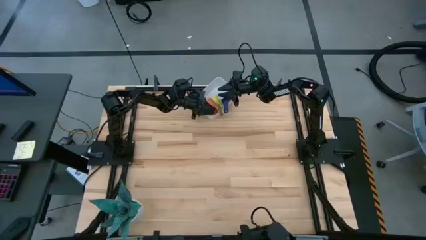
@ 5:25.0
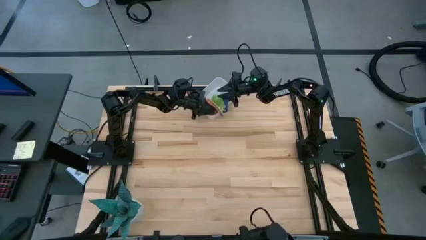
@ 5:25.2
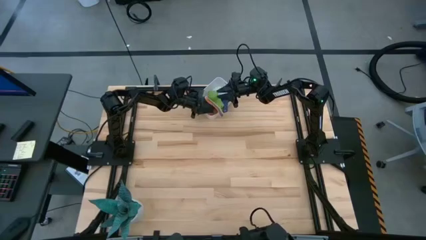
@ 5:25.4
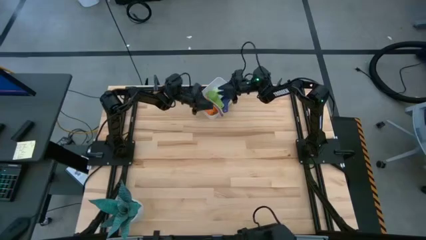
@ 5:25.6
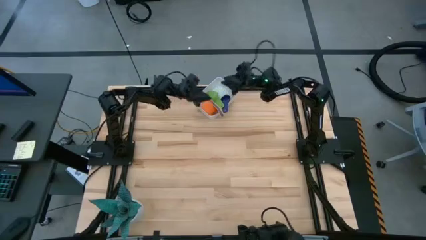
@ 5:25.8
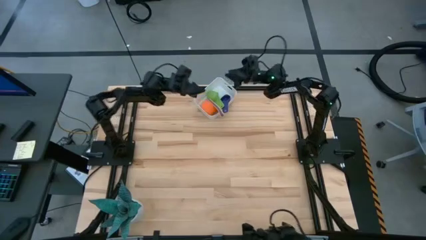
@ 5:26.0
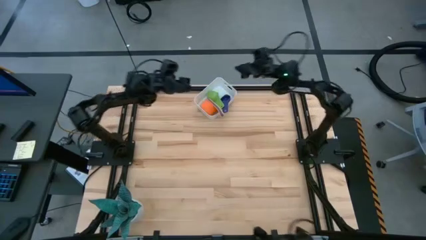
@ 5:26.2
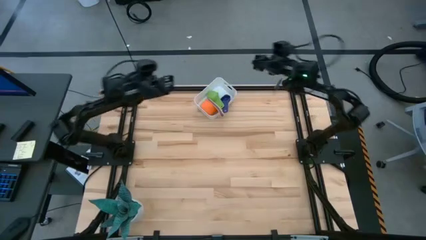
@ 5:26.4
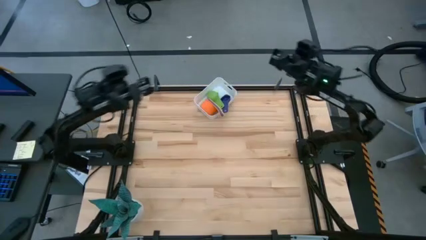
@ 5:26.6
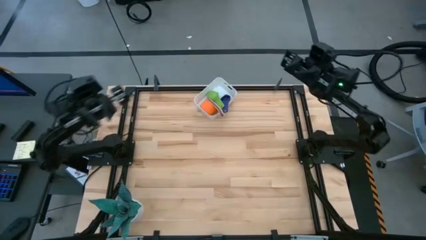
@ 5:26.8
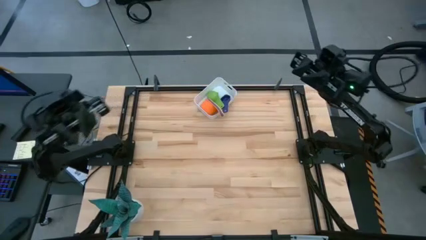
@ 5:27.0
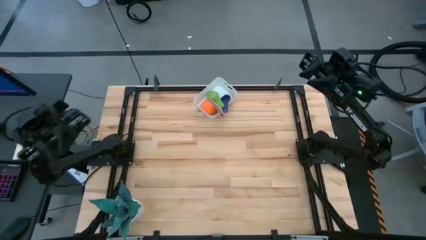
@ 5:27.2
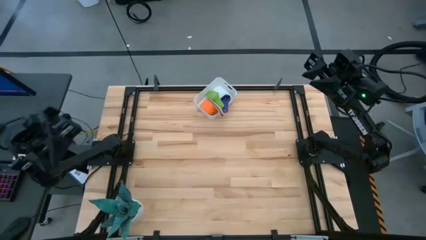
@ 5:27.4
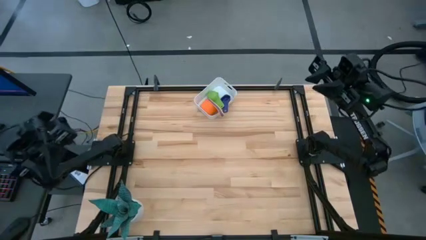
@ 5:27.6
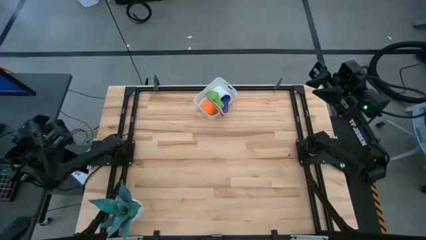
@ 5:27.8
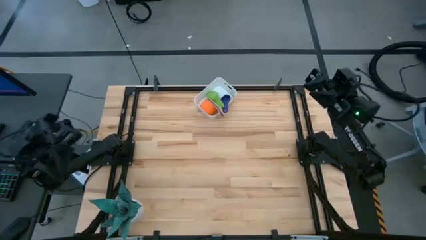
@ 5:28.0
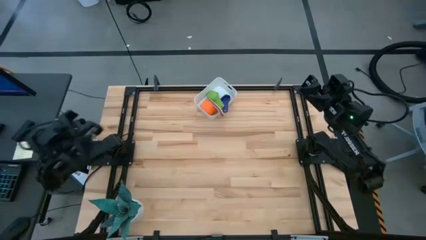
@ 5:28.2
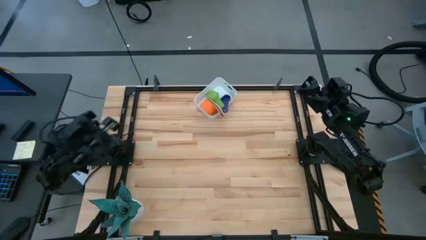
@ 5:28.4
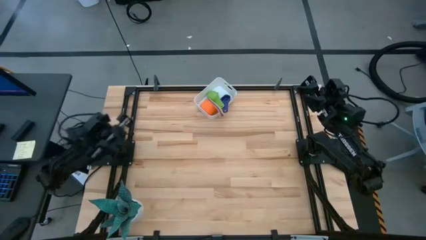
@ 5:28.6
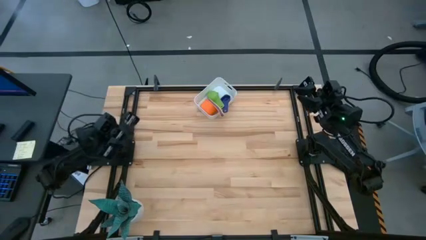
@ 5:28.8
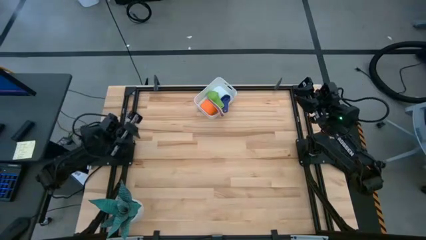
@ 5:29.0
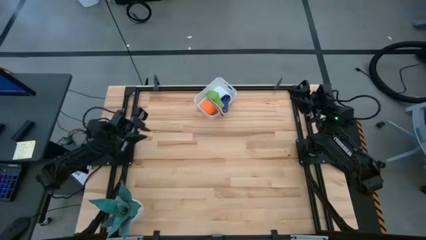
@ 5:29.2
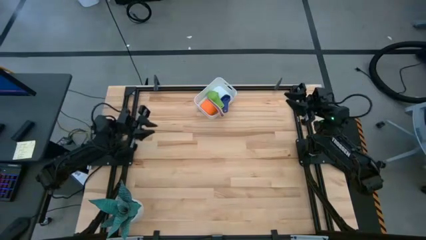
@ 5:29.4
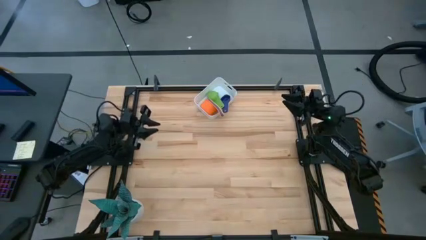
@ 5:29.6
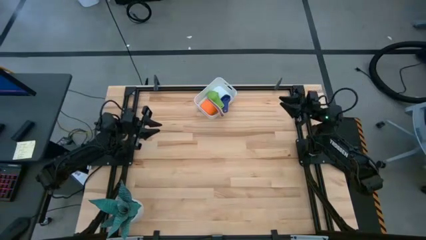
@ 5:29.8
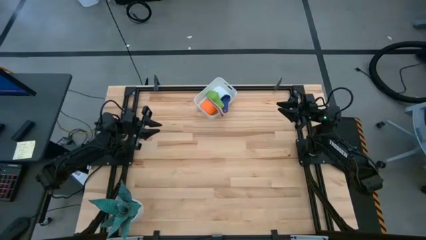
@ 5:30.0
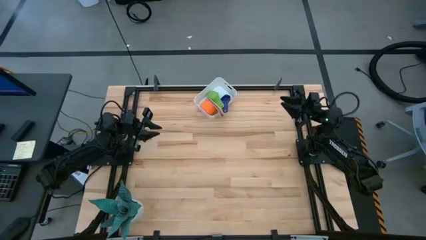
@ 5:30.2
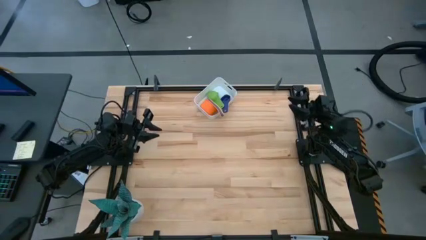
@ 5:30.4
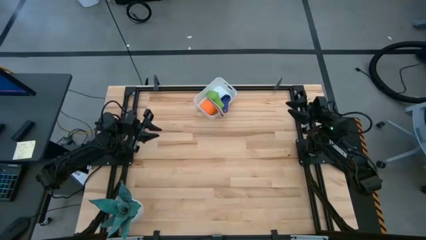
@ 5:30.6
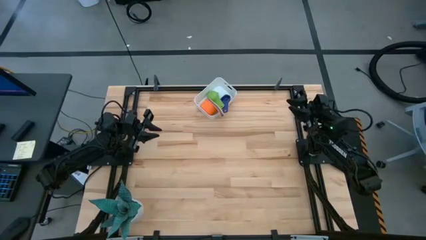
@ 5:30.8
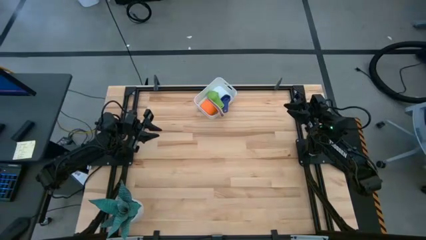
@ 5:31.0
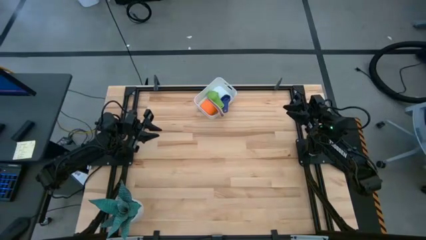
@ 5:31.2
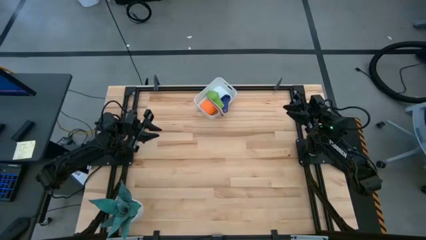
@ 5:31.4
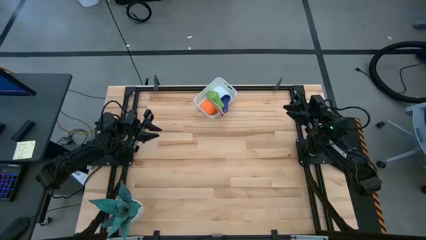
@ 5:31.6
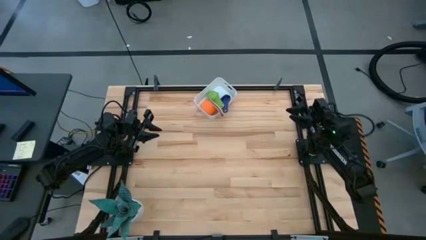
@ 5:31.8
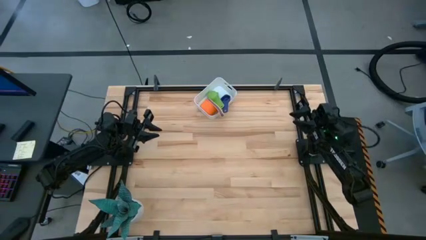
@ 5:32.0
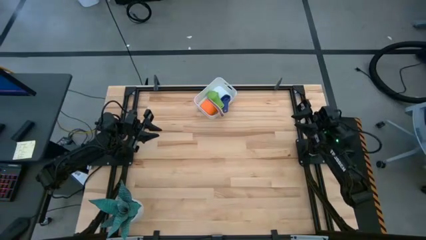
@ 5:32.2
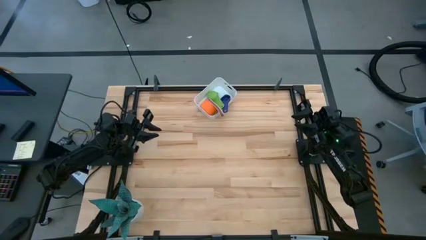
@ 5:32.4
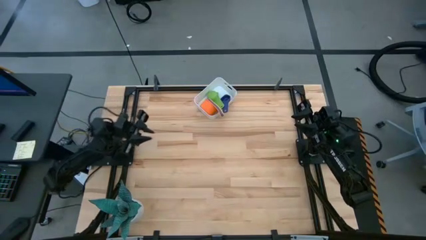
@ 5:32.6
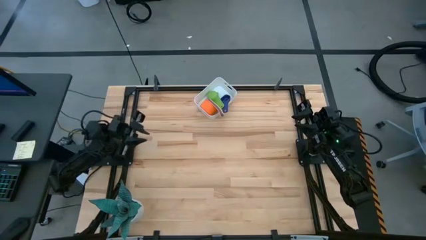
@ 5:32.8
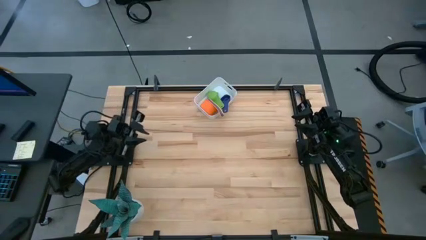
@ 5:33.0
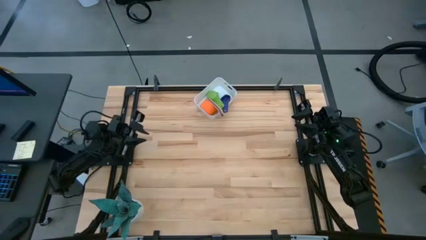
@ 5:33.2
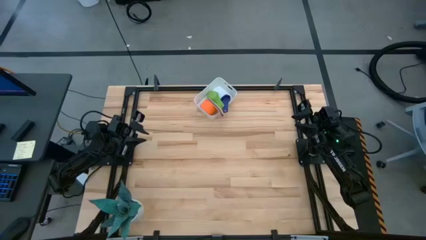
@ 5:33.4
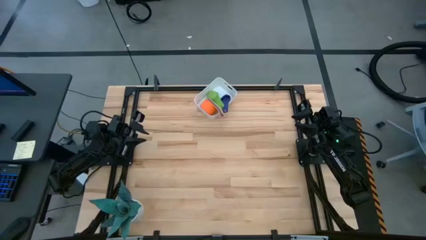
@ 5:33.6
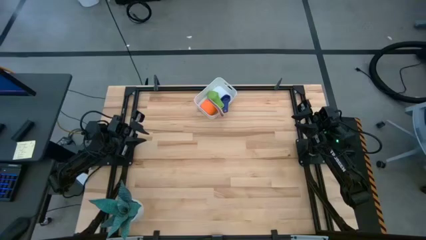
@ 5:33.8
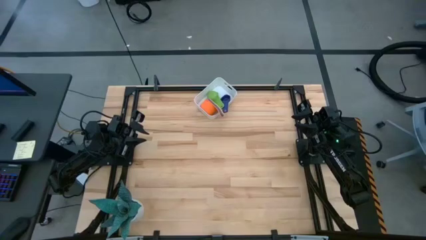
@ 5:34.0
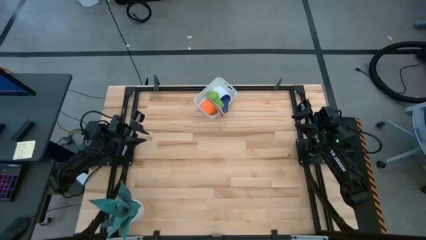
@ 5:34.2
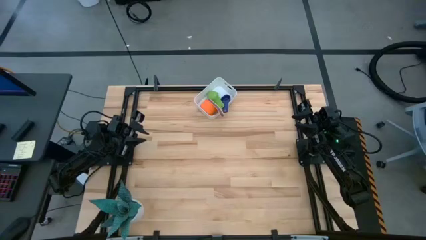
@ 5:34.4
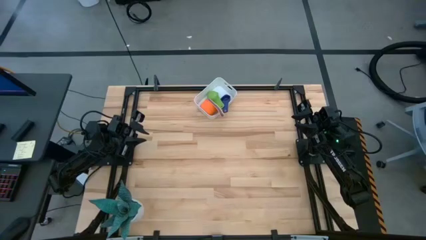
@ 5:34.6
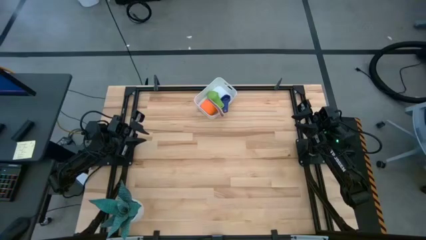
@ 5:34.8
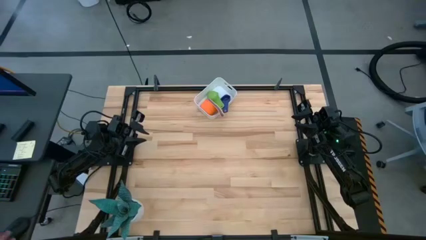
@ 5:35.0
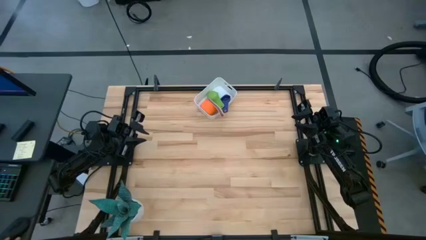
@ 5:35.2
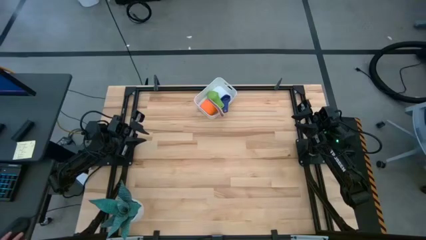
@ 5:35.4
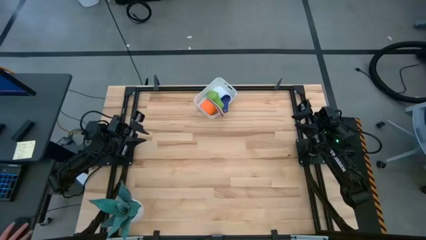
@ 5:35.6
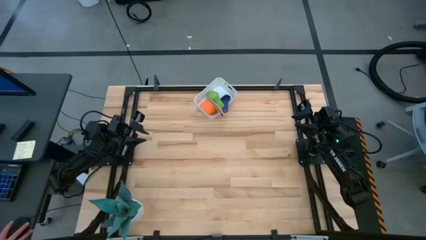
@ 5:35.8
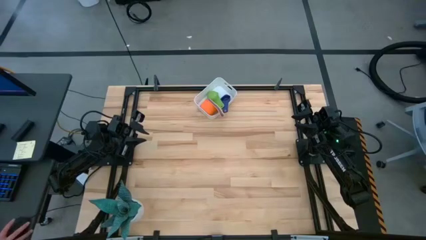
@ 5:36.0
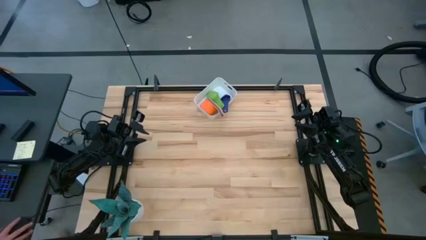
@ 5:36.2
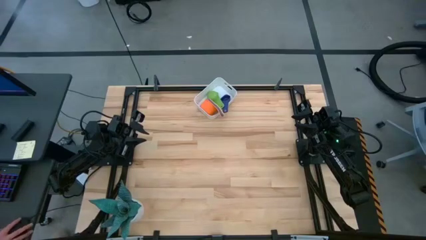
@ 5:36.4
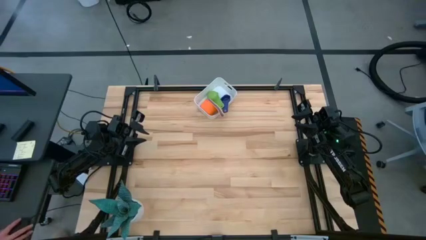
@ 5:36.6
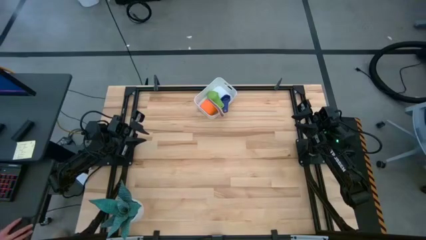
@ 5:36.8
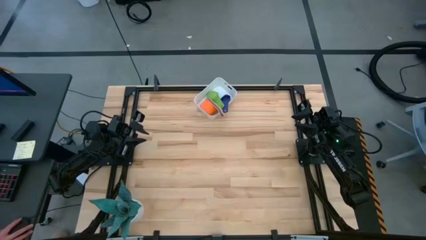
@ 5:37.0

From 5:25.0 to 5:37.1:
Task: Nest measuring cups in basket
Return to Home Position

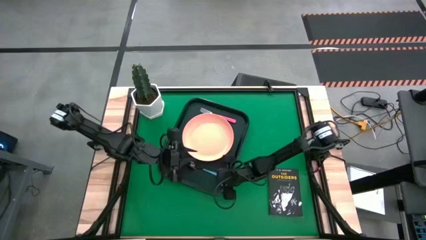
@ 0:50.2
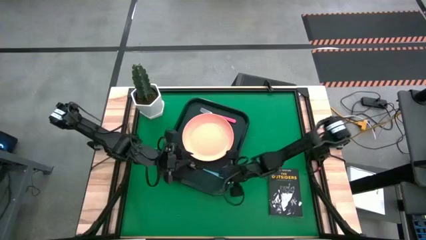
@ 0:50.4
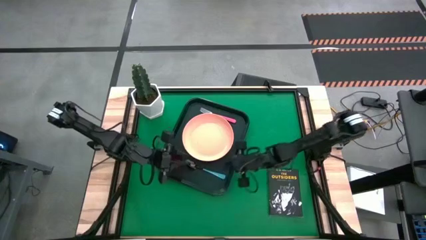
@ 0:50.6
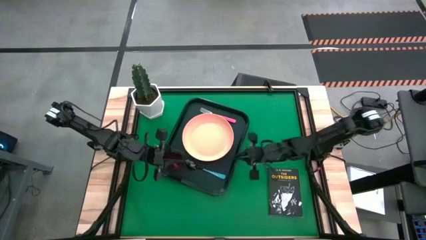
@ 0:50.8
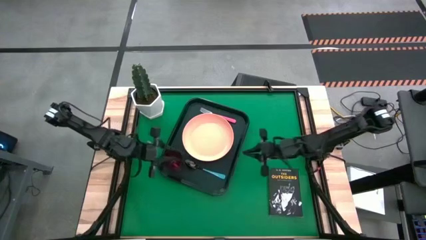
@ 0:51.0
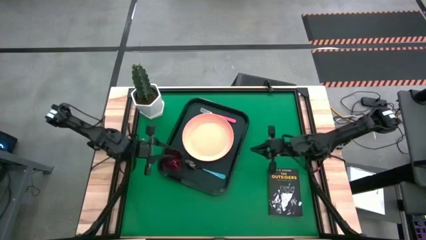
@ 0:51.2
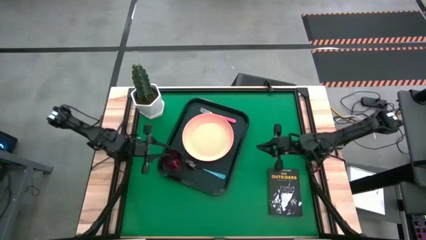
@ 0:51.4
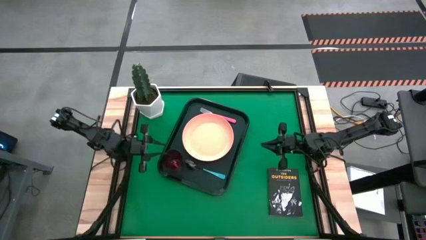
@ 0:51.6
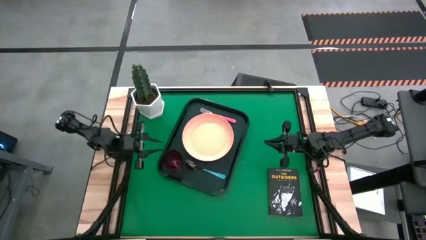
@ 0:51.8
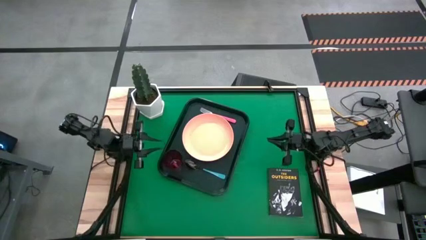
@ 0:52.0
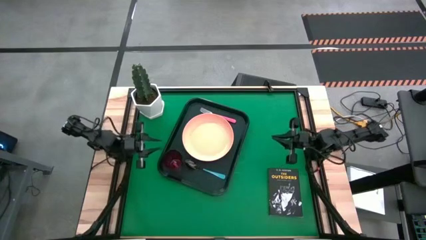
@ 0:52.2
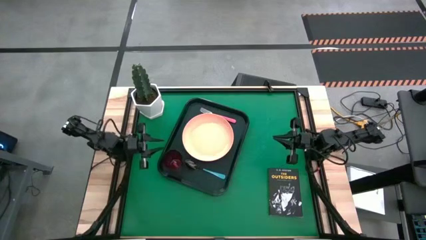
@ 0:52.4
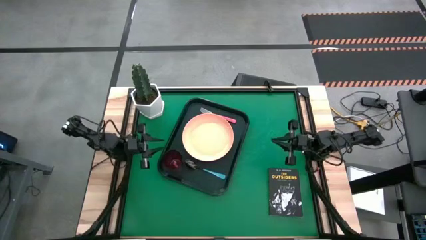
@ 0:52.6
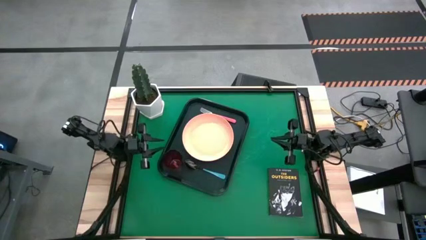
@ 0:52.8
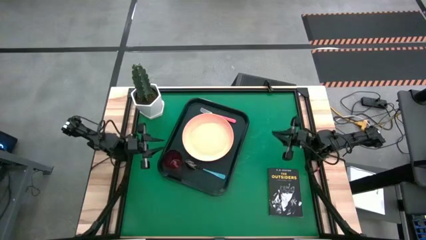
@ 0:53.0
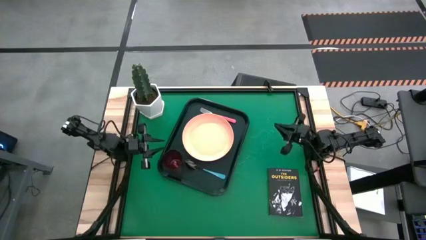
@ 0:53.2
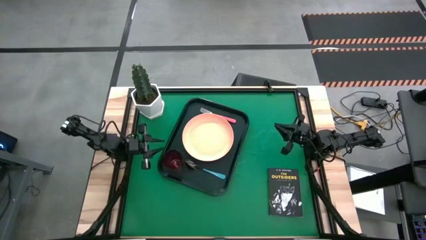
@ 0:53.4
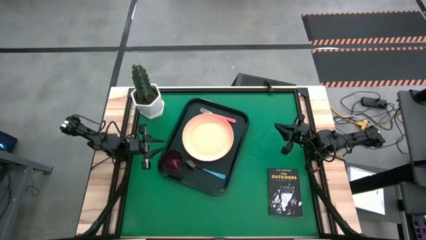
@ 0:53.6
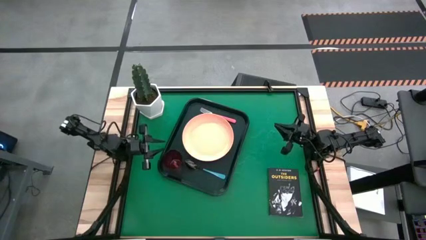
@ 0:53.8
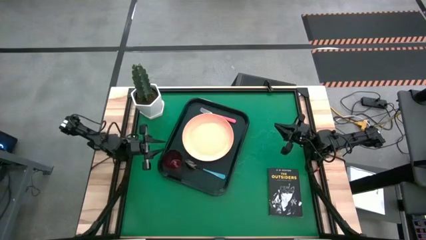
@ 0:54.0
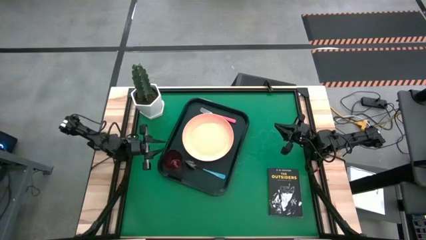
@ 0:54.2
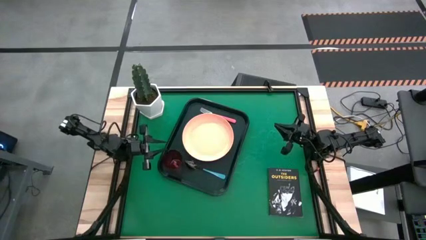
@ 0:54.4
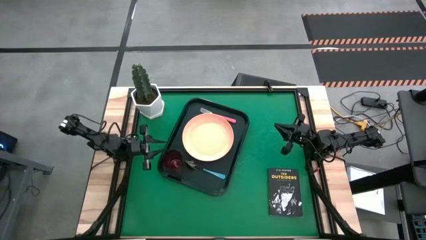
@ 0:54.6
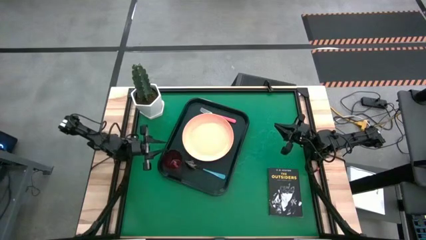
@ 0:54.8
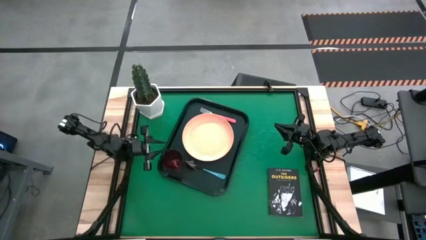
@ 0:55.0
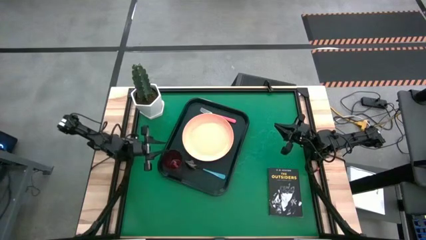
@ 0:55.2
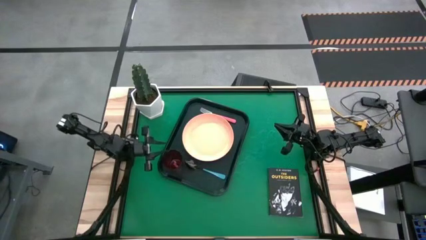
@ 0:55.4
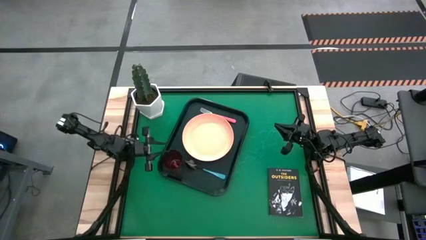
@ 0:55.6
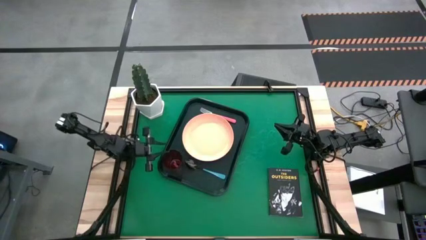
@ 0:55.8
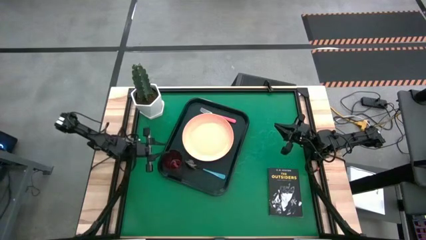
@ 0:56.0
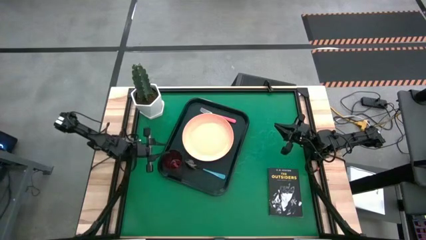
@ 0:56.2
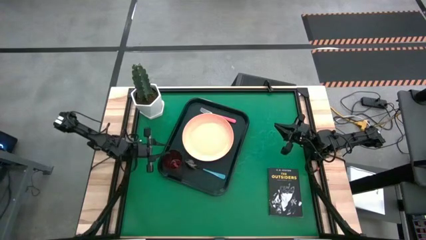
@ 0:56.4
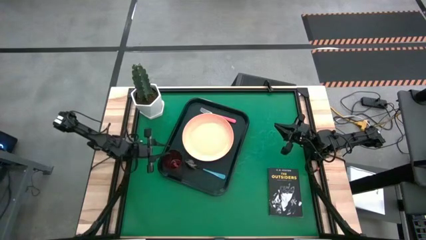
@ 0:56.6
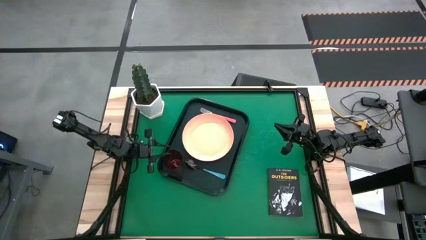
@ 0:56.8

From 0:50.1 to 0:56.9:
Task: Pick and place plate/cup/fork/spoon on tray
Return to Home Position
